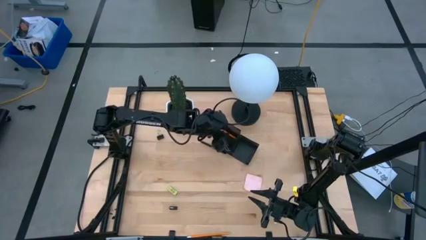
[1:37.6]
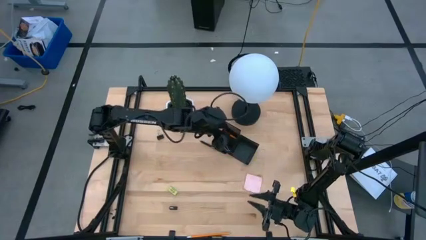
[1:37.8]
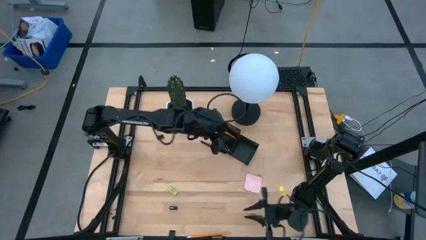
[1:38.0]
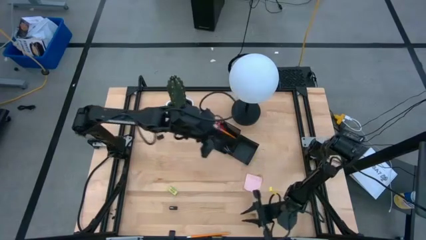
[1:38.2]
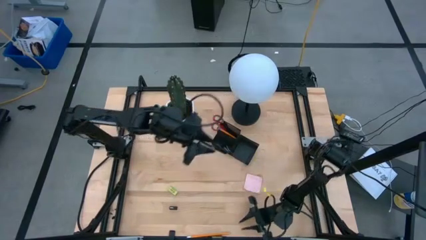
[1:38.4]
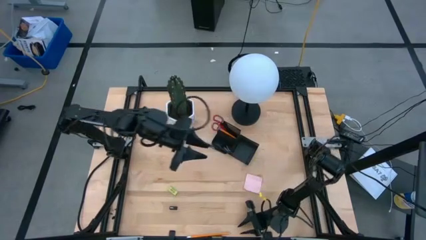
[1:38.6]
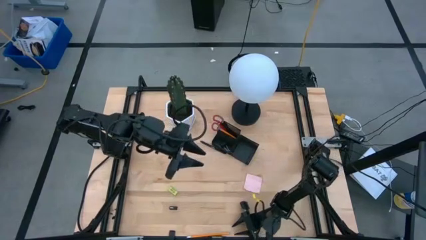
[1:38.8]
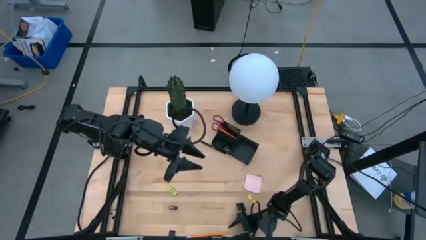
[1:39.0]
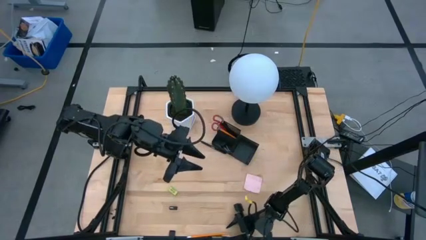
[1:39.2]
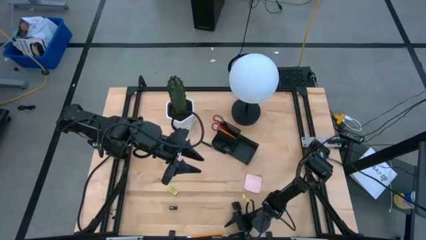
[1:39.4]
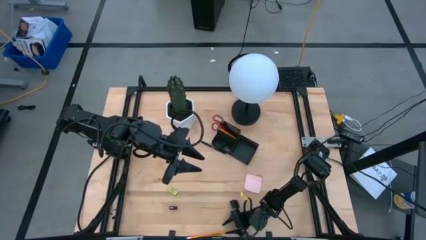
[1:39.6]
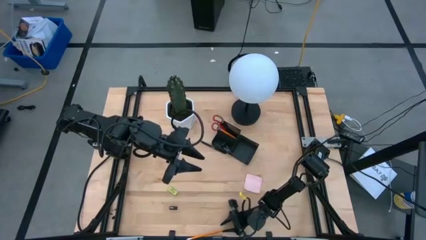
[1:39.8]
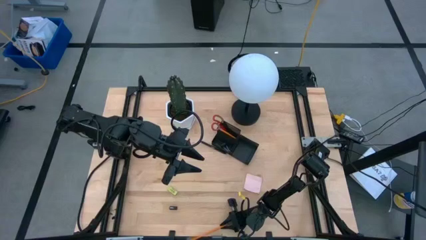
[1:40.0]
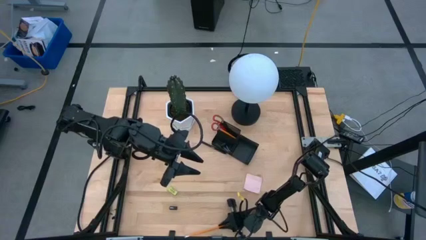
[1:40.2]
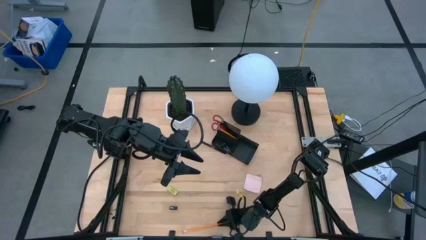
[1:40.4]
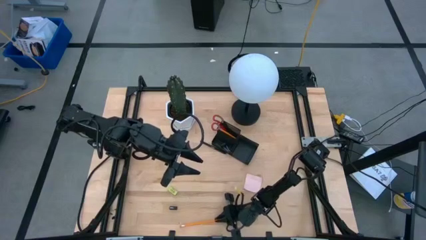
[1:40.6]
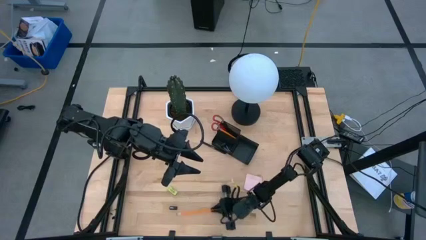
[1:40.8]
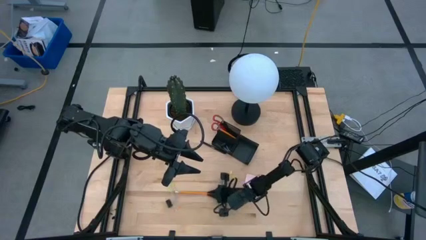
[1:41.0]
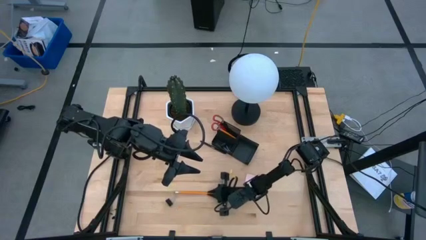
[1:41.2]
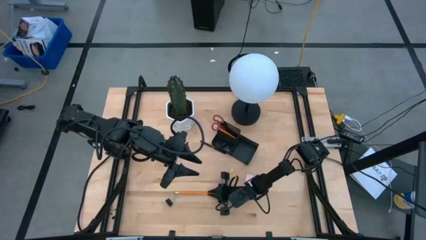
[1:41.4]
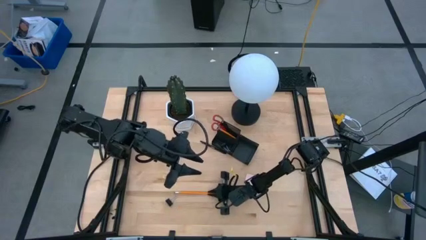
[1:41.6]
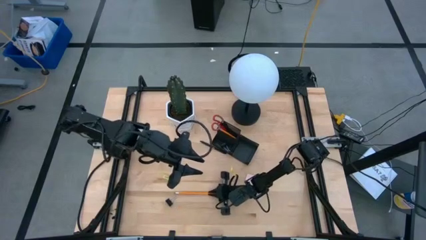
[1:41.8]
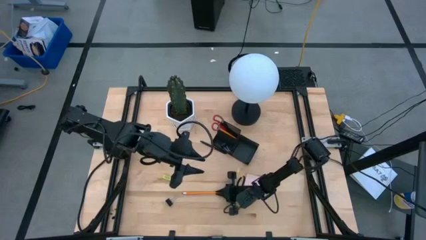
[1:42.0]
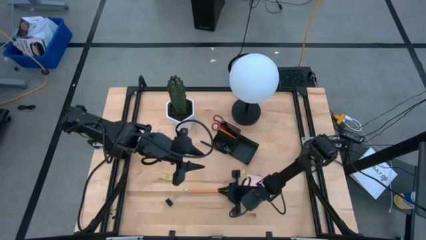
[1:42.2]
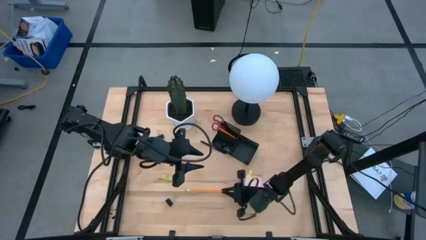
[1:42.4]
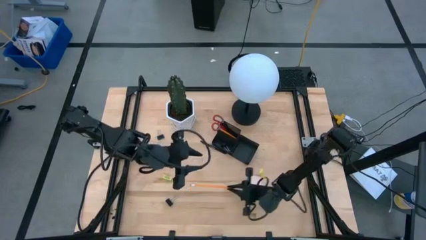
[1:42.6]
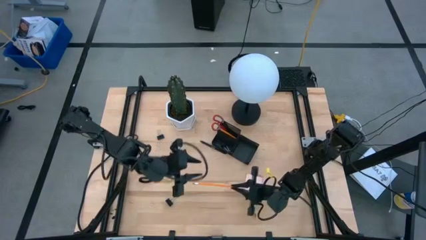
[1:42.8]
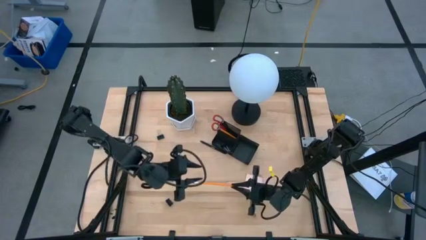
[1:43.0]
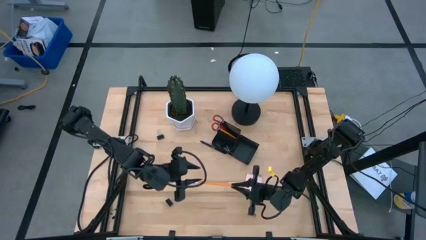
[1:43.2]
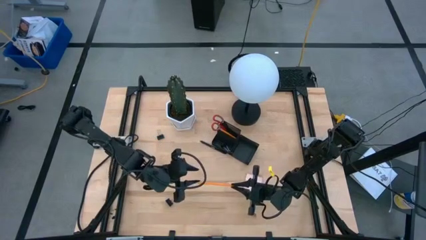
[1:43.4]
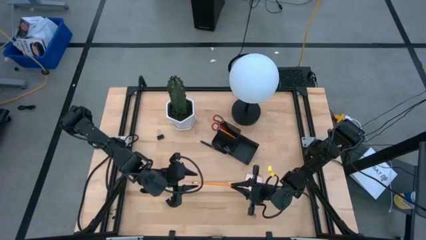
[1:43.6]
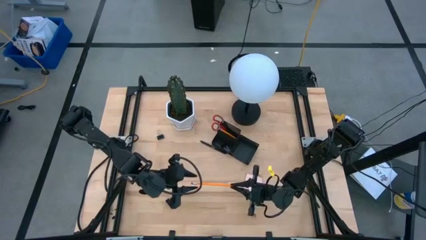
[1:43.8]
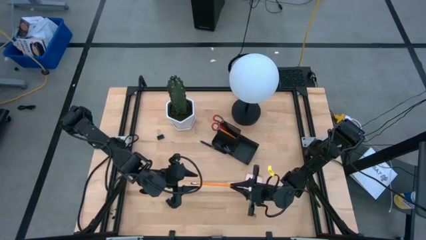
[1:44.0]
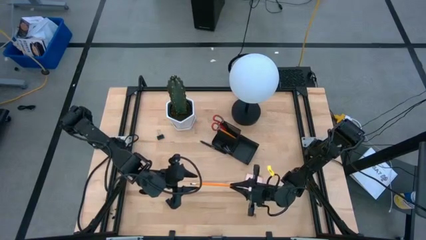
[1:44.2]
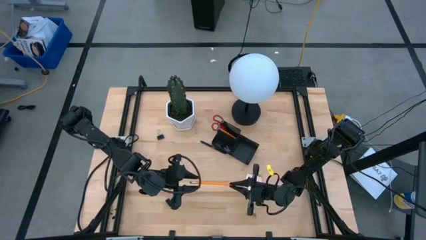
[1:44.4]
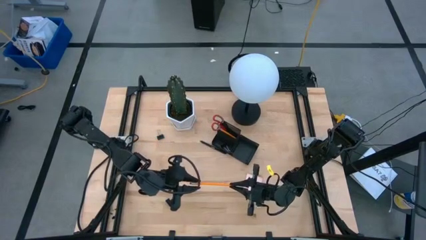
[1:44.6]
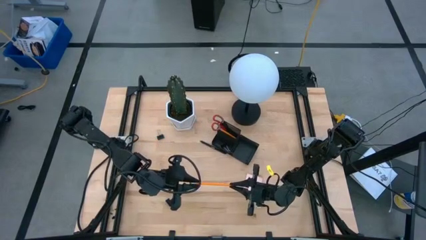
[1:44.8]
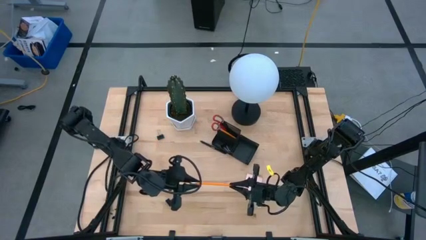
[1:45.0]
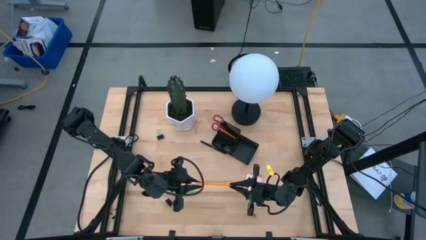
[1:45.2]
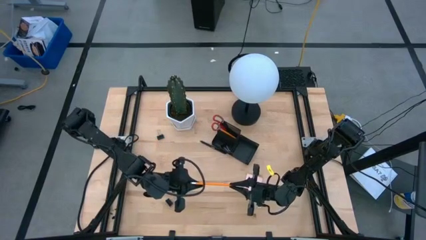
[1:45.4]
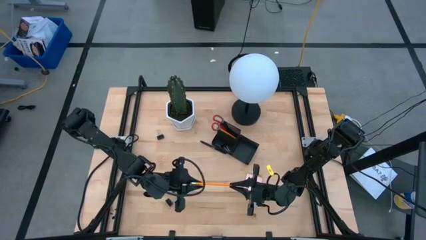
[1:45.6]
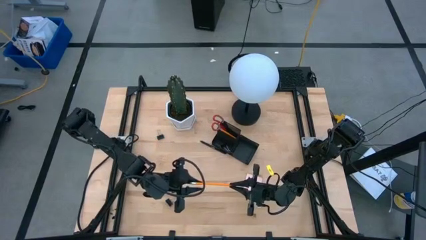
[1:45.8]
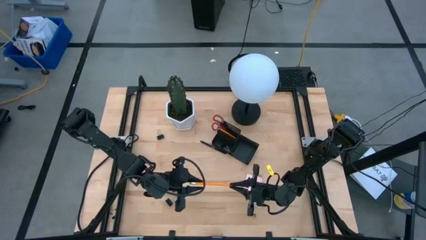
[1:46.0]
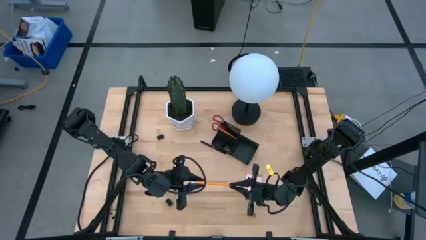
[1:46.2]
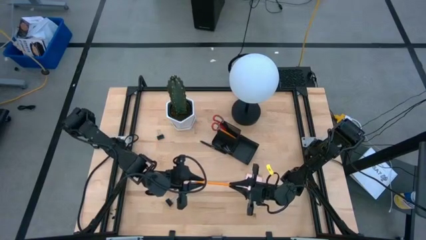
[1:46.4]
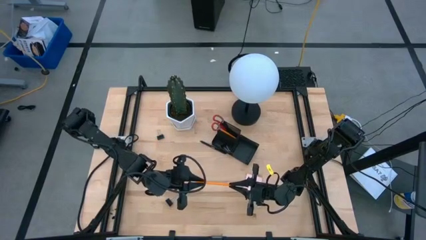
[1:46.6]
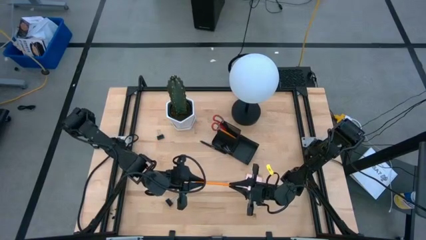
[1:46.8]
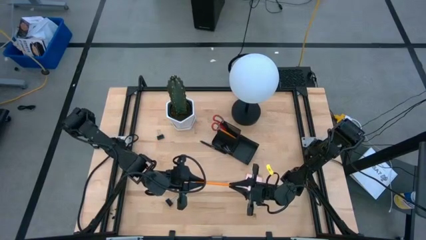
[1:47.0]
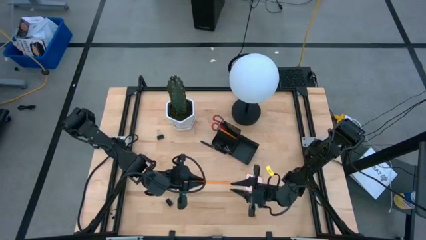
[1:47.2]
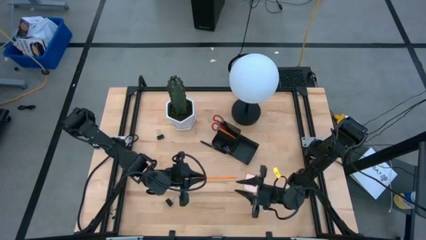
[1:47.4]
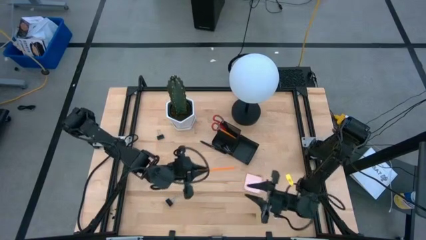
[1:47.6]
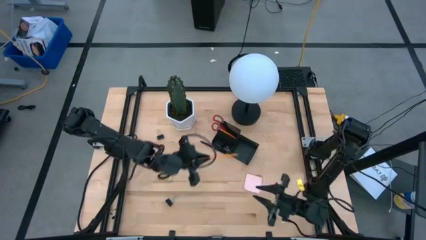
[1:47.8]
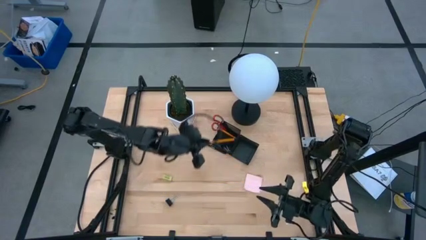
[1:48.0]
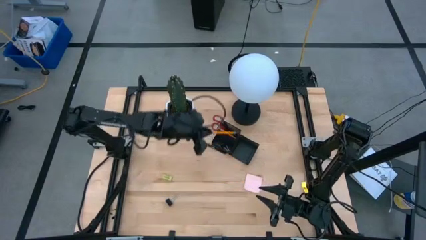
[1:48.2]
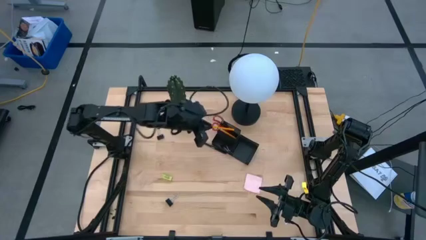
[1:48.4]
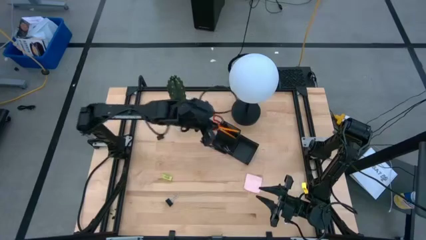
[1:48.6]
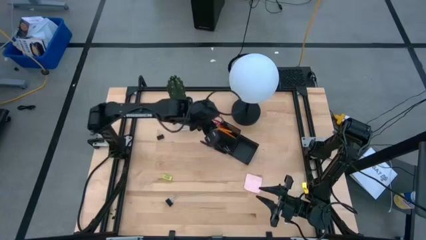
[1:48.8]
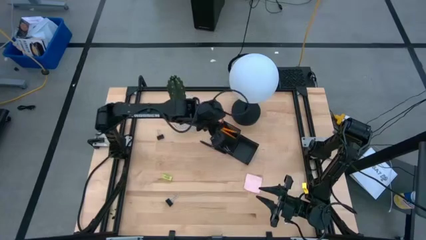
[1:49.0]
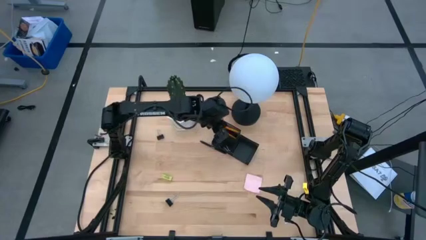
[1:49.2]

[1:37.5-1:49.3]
Task: Pick and place office supplies into organizer
Put the orange pencil into the black desk organizer

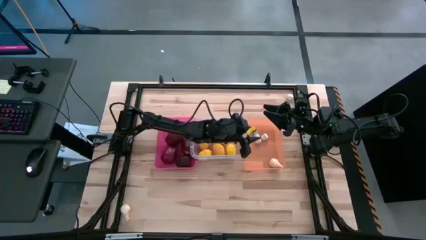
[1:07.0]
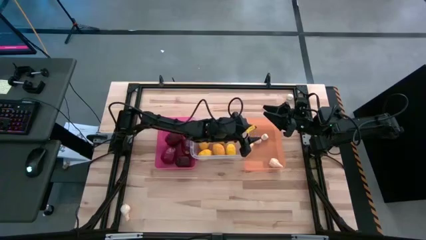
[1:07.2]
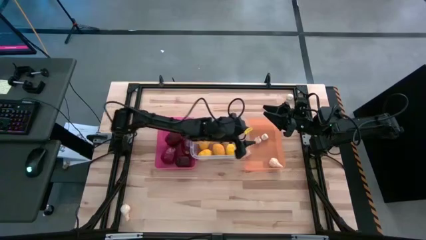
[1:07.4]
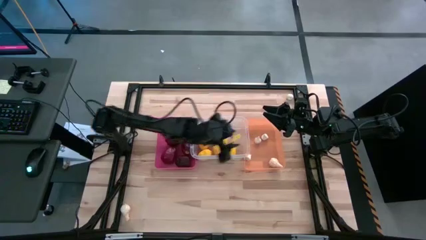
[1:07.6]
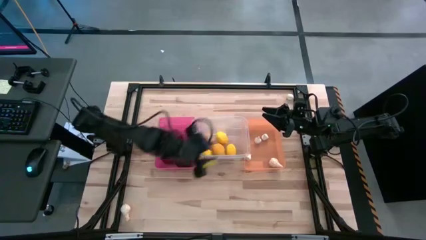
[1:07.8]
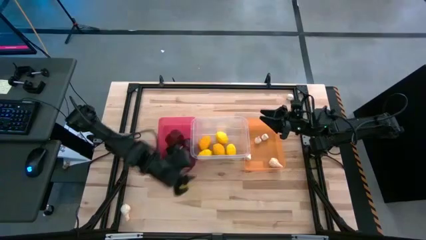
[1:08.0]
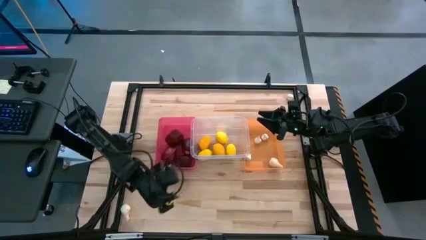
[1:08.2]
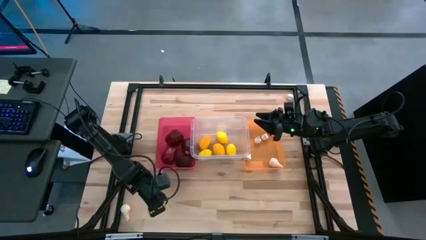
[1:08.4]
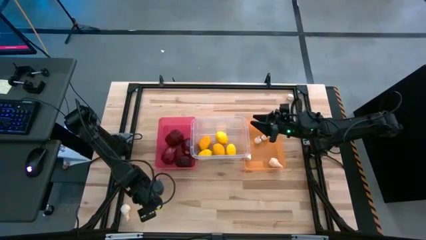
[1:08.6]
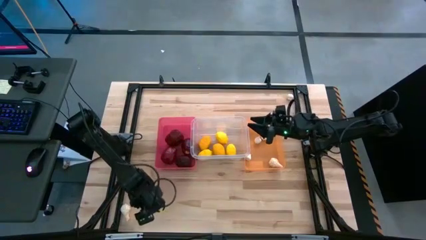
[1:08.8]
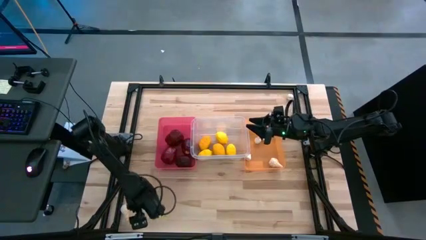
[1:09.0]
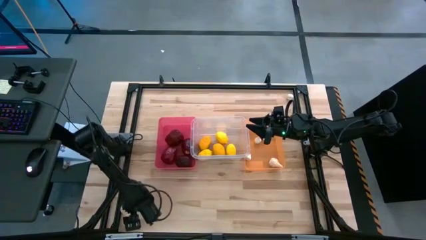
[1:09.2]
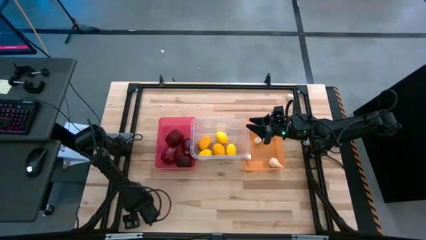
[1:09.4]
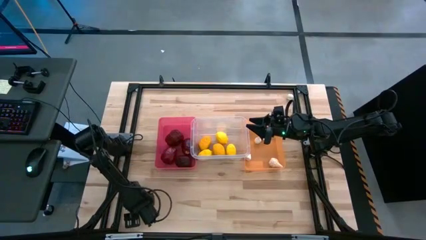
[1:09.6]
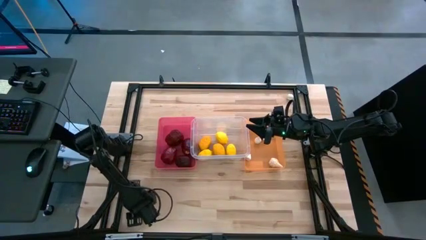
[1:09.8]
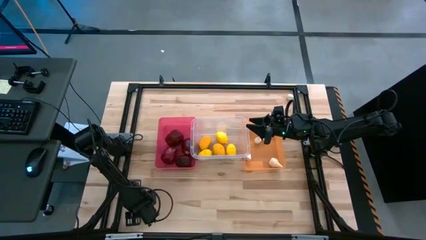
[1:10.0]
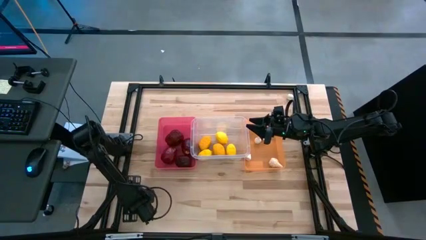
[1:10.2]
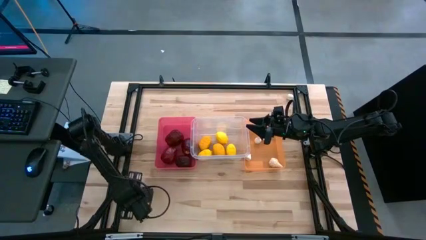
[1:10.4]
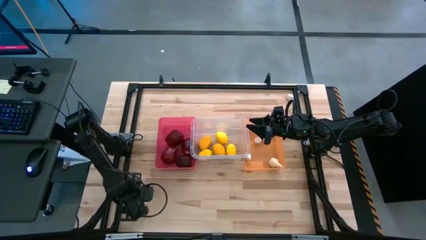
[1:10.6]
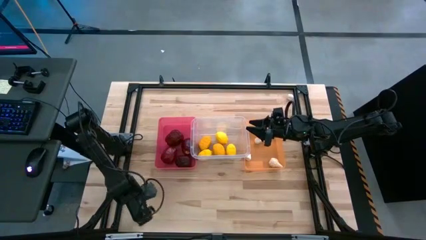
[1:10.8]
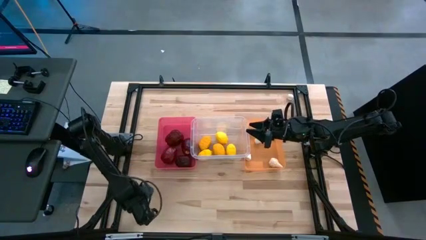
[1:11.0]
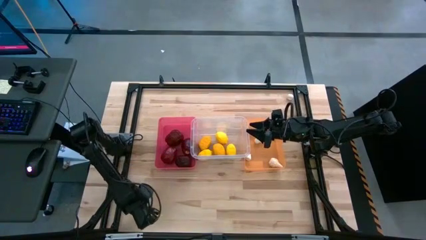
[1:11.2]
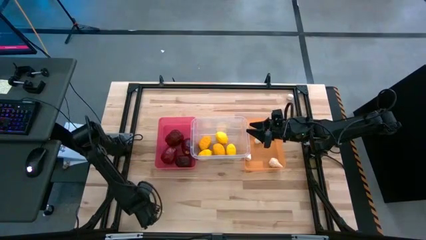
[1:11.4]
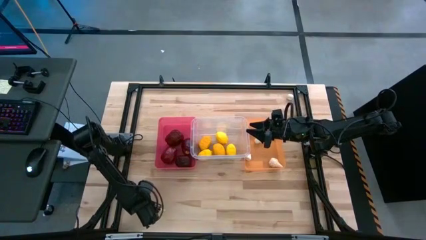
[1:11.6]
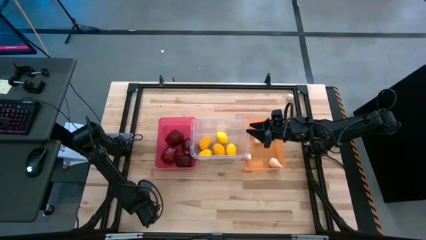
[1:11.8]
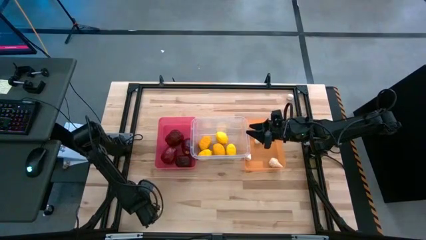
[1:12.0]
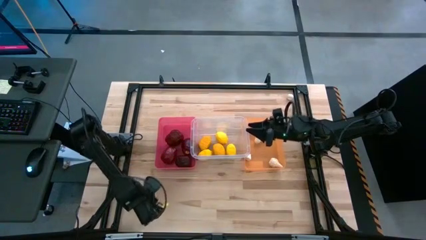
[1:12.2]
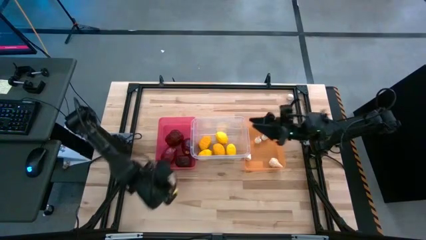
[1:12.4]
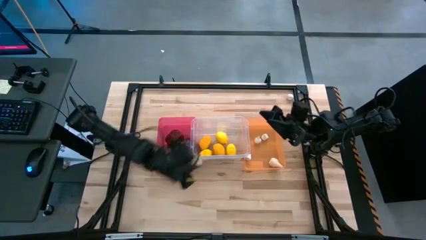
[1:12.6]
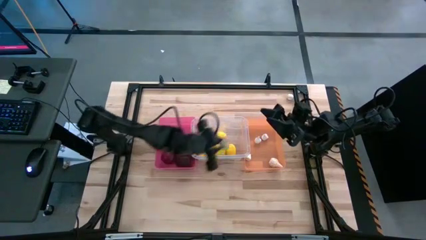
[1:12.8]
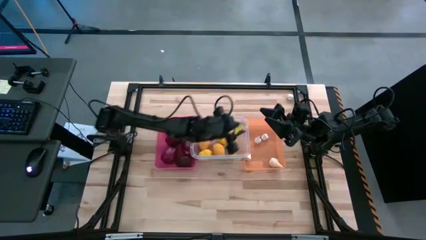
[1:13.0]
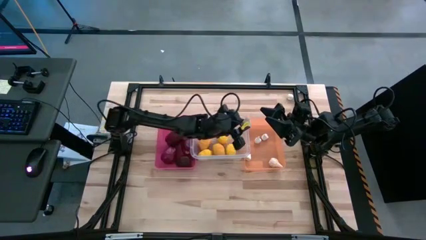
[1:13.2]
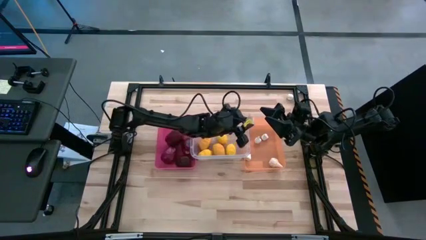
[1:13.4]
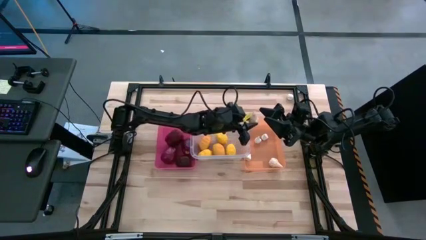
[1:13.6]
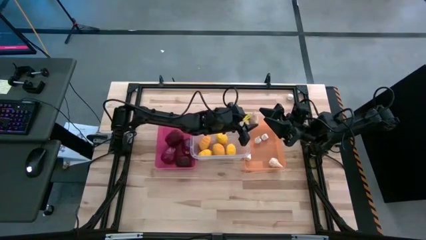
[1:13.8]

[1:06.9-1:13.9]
Task: Sort produce into baskets
Put the white garlic into the orange bin
